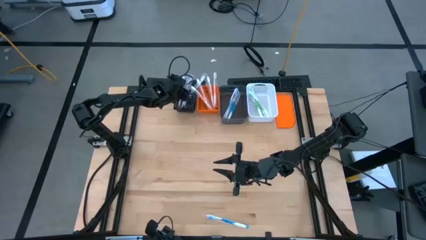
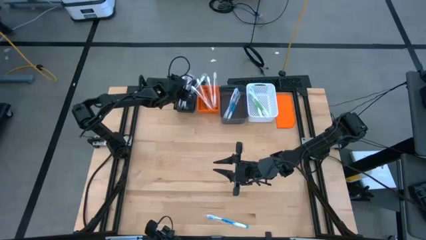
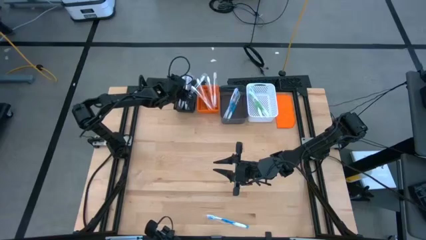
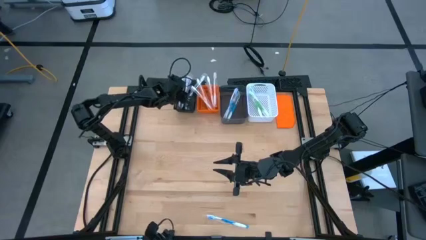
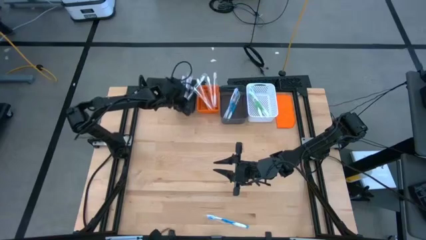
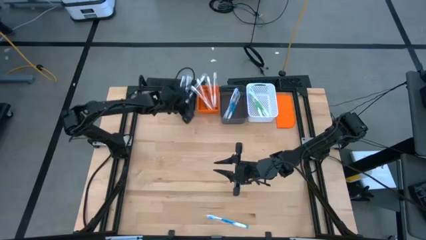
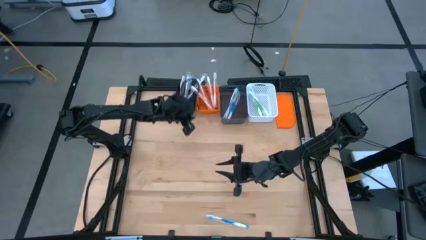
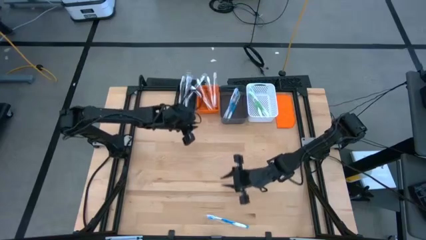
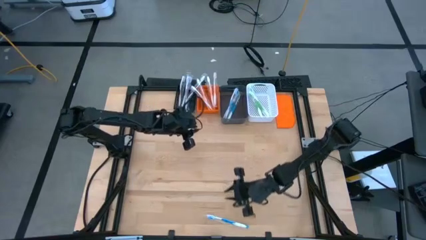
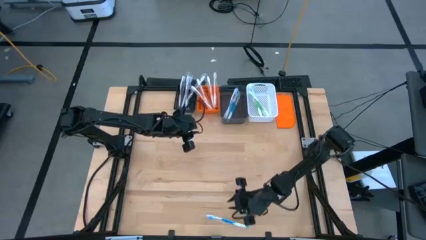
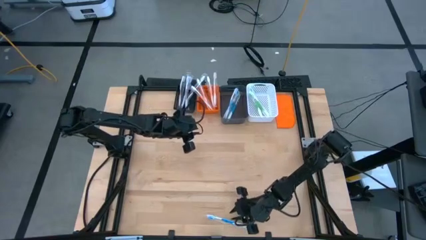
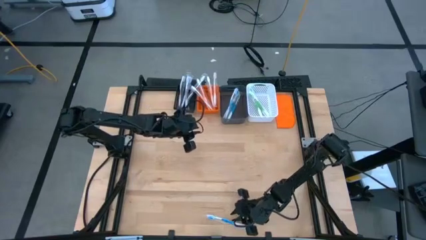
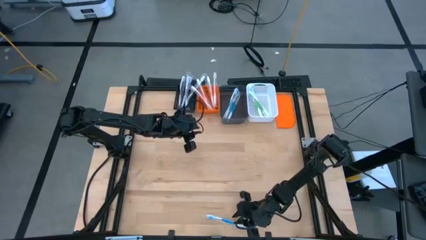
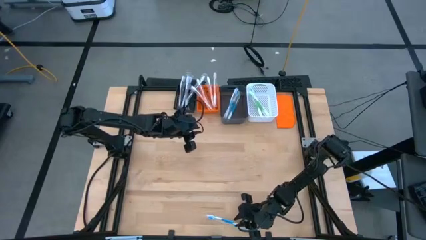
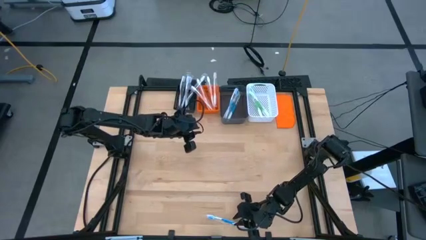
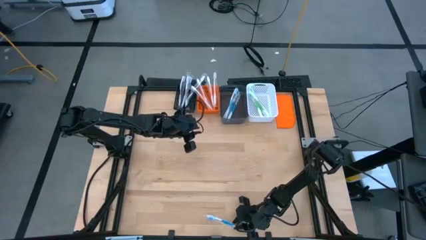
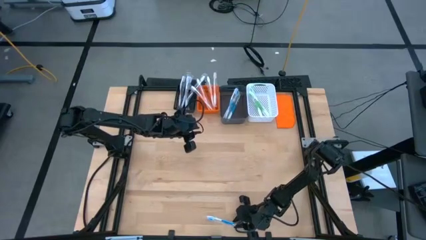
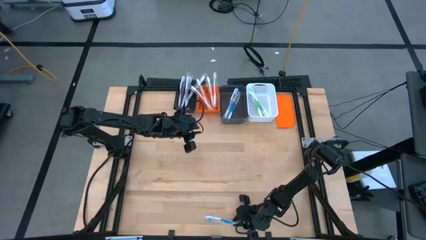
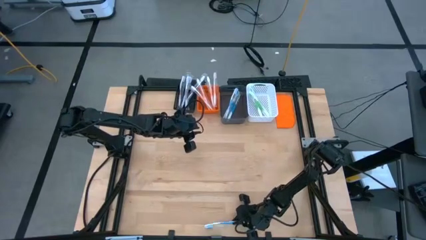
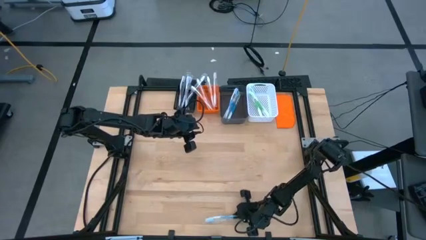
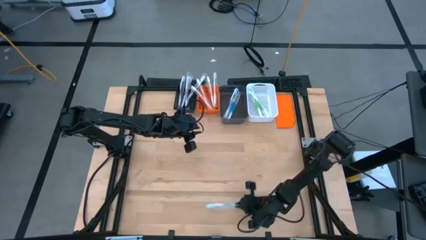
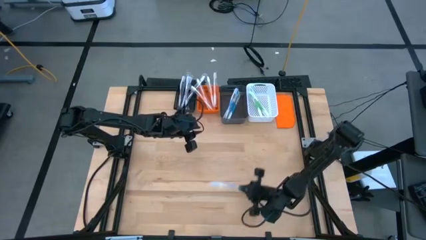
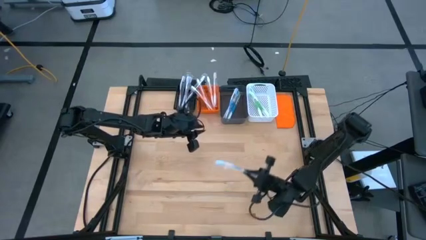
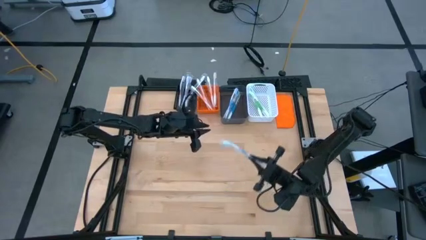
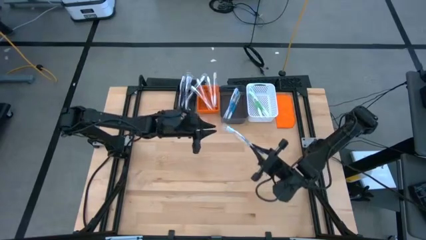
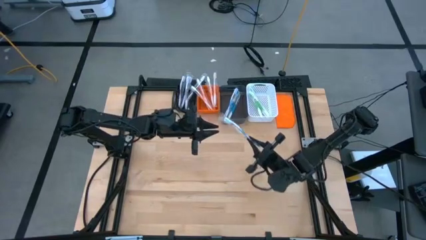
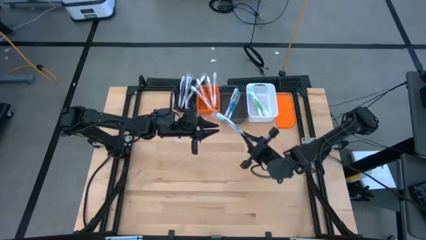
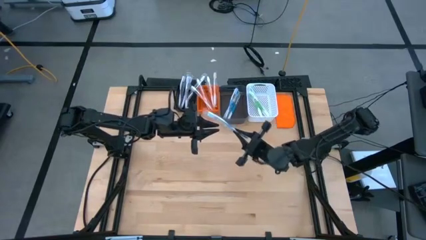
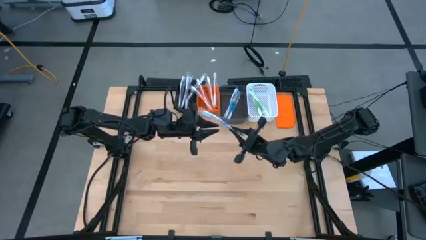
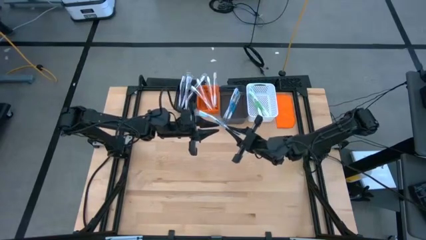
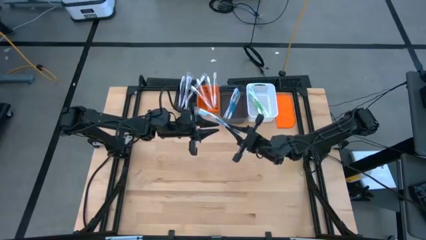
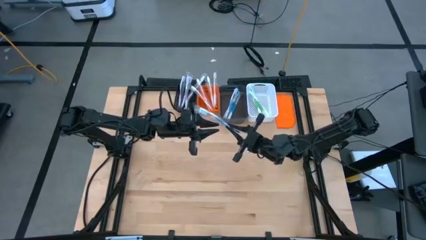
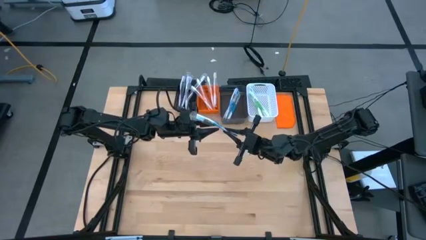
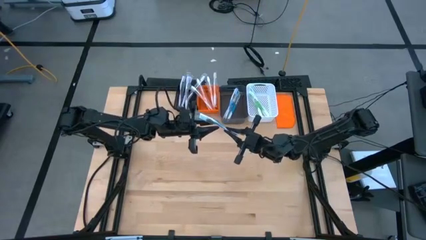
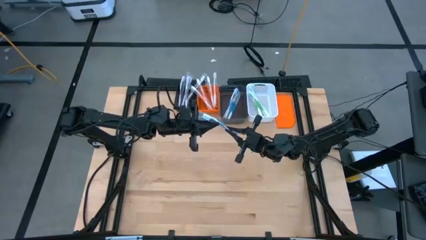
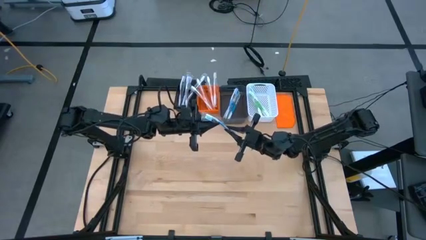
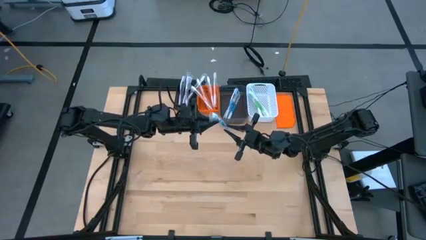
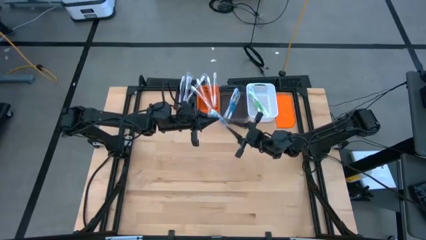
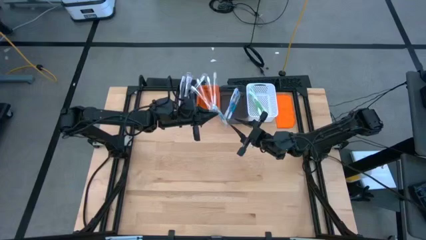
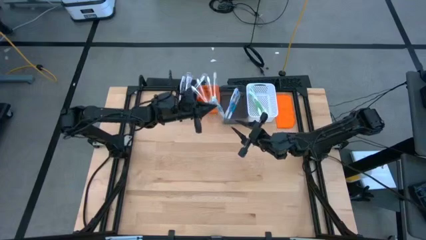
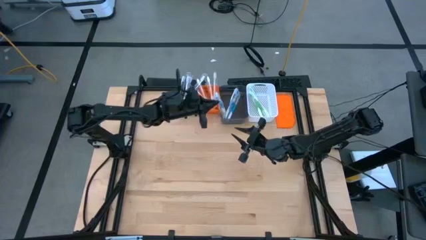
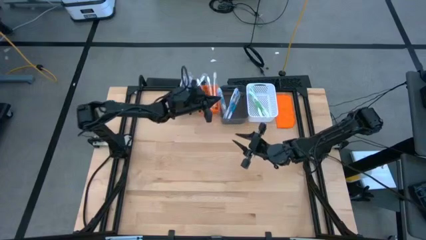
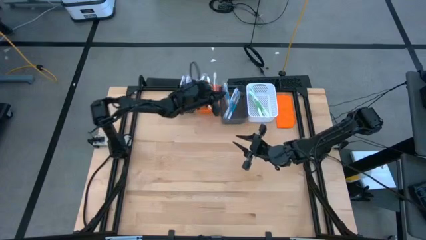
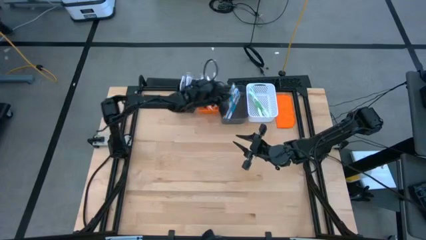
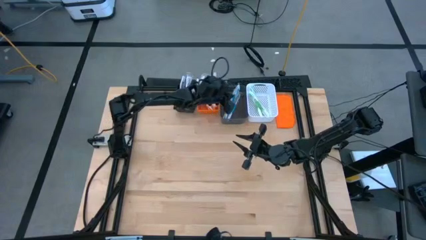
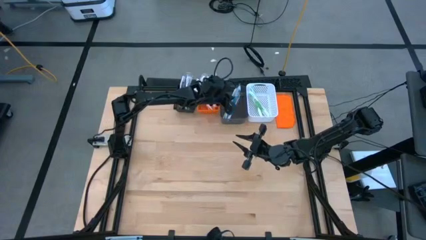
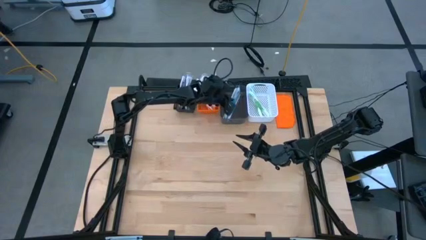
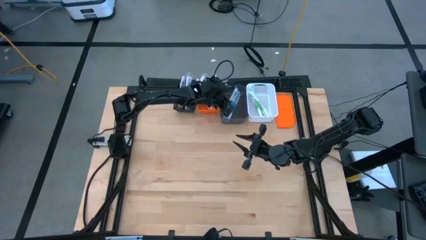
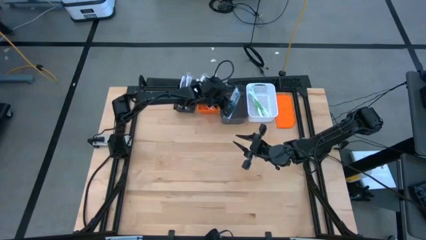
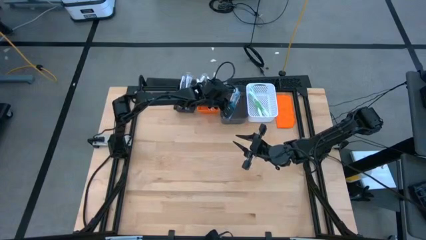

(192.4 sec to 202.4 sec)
Task: Pick & Place Toothbrushes
Put the blue toothbrush into the black bin

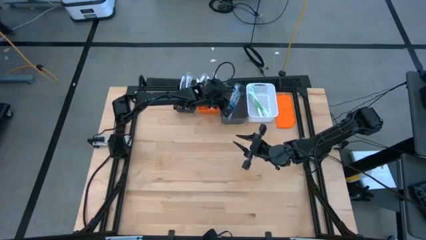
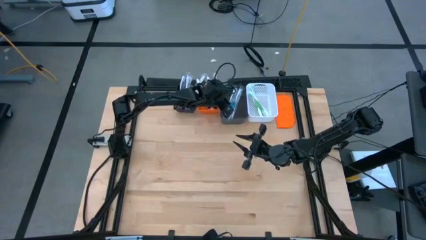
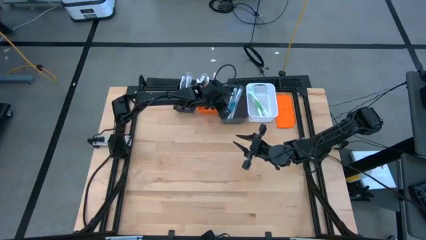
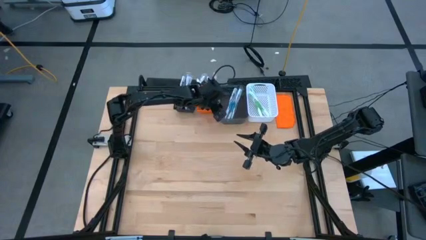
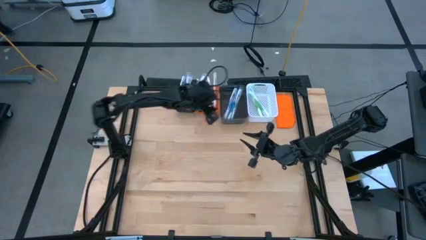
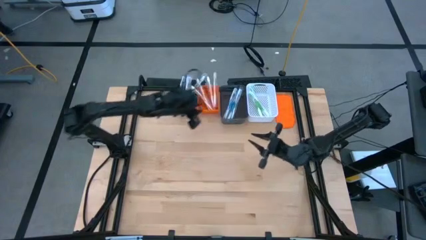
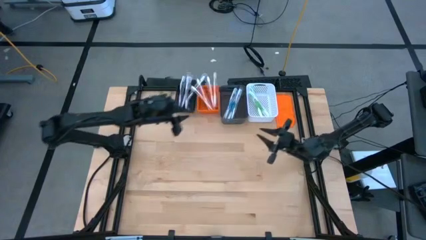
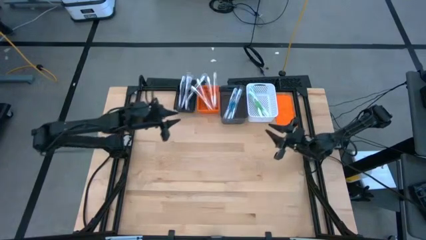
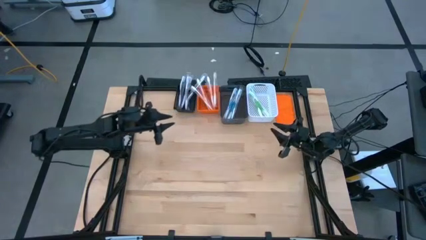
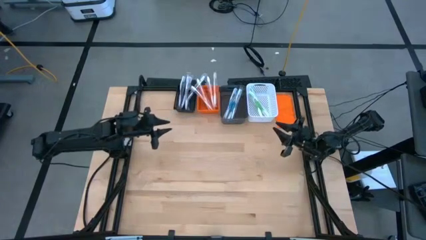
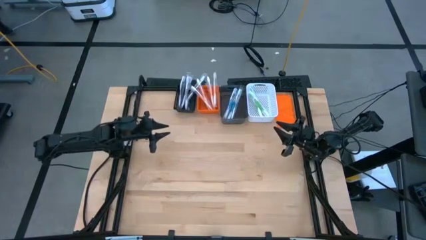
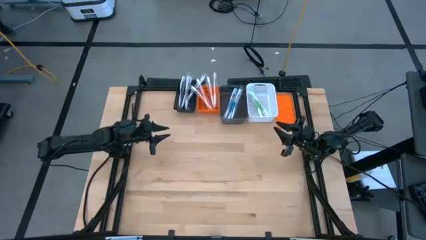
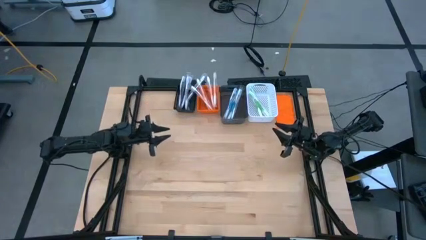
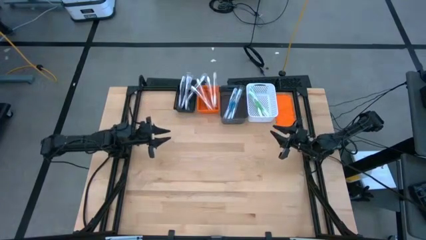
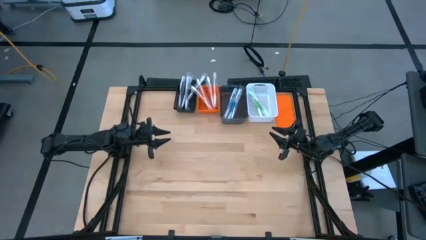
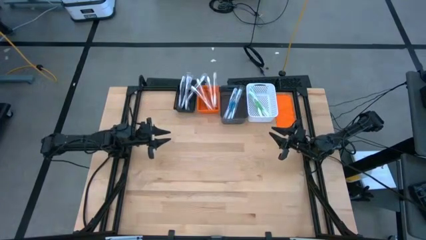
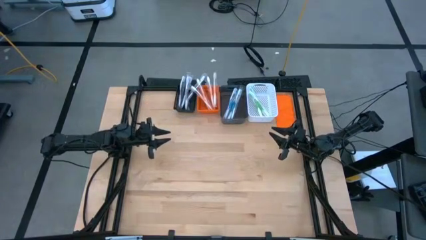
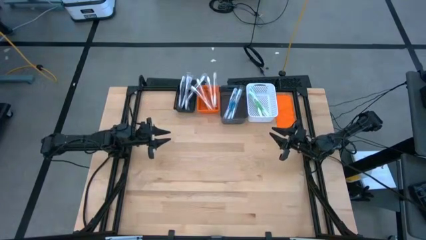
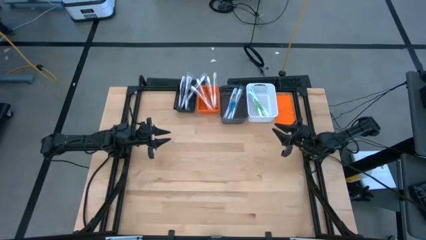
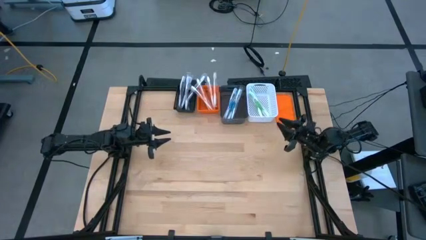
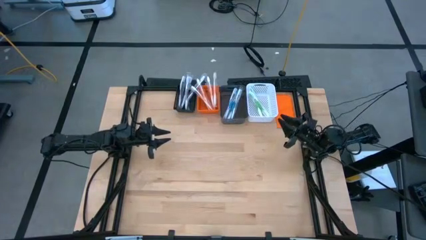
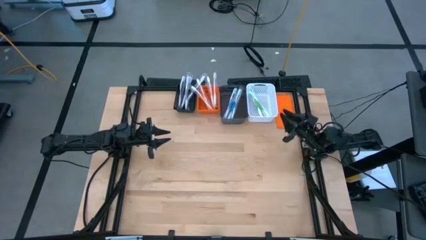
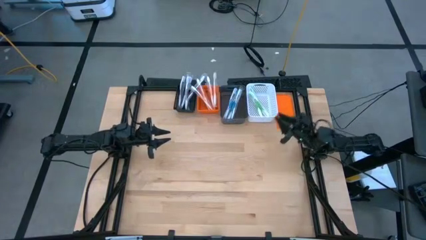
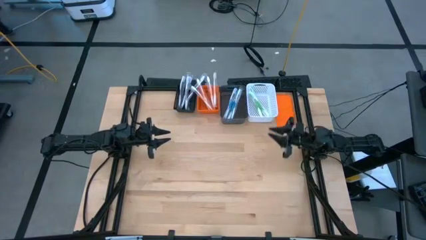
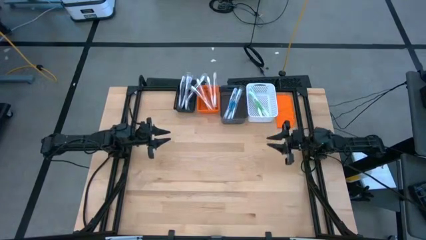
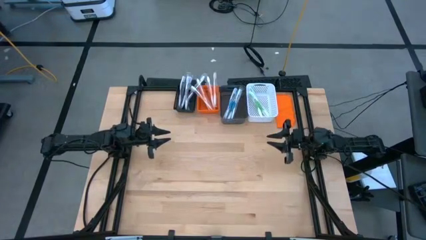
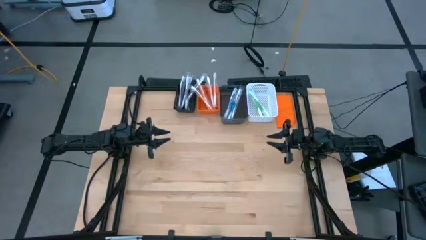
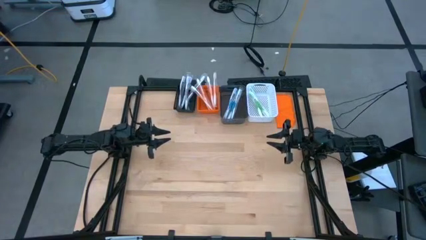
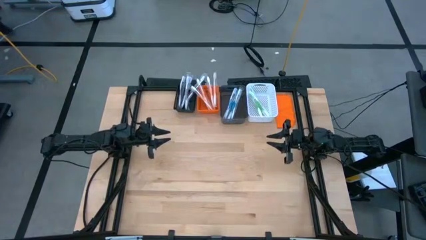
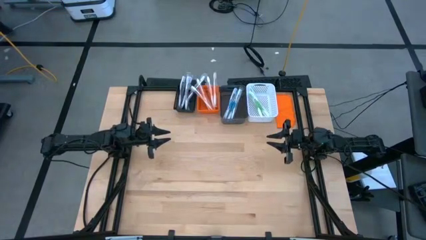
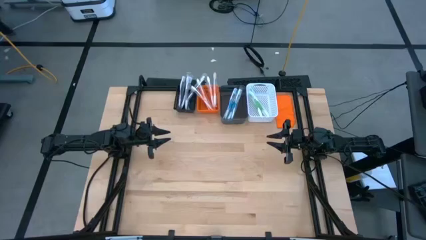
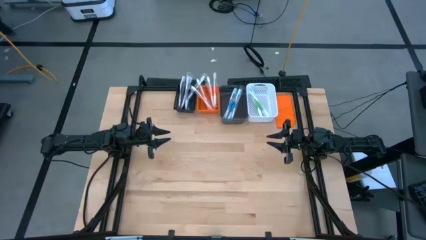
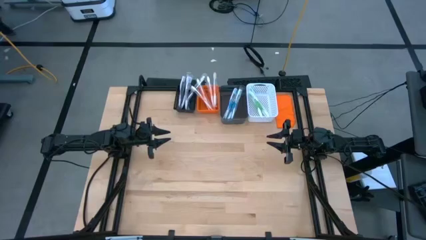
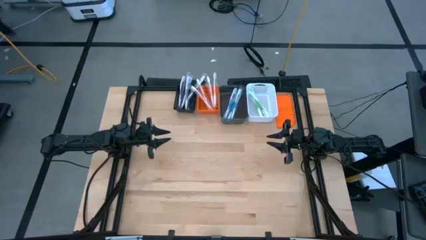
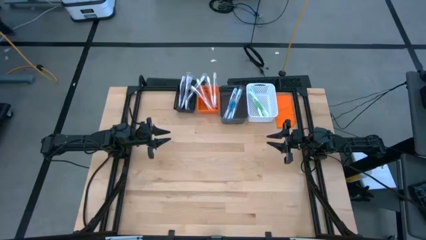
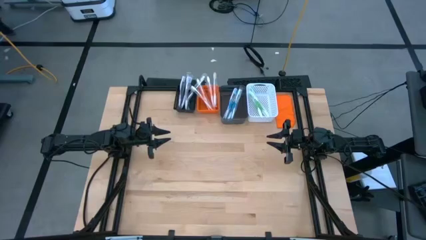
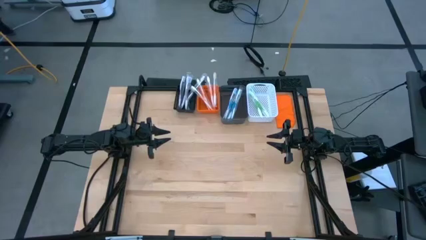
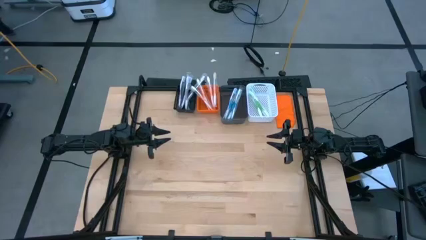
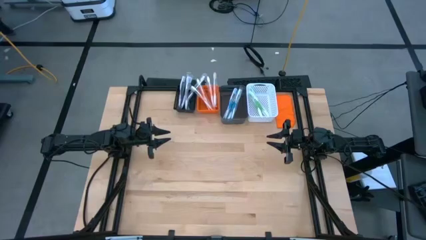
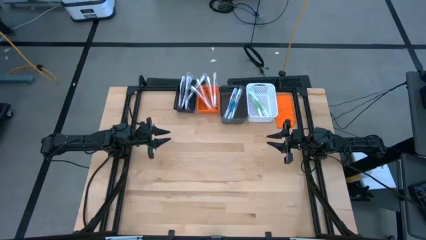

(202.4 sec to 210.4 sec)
Return to Home Position
